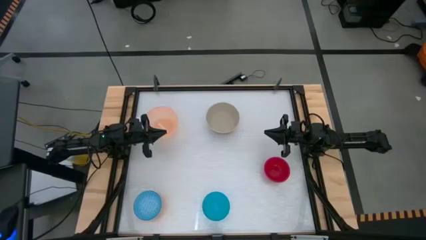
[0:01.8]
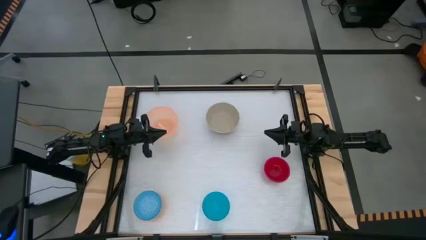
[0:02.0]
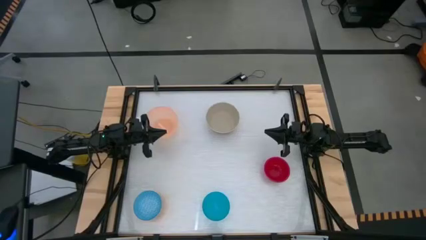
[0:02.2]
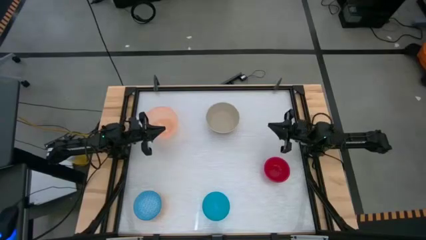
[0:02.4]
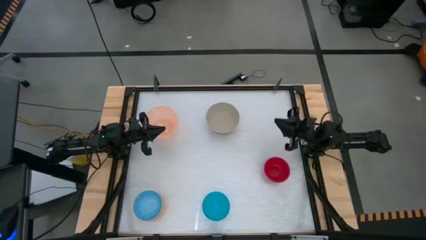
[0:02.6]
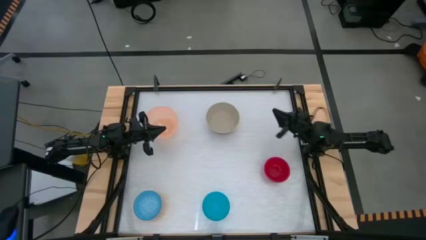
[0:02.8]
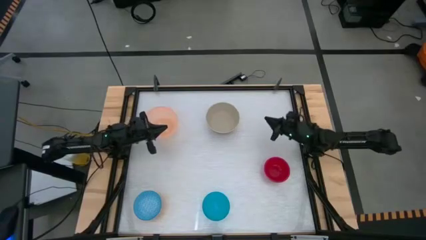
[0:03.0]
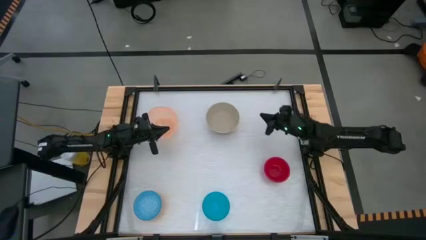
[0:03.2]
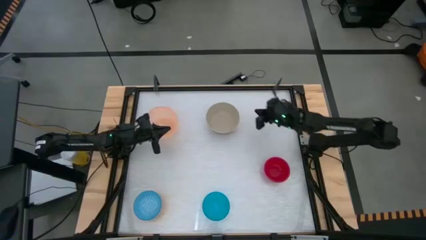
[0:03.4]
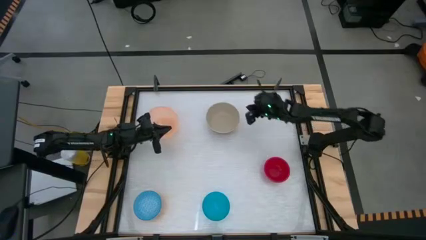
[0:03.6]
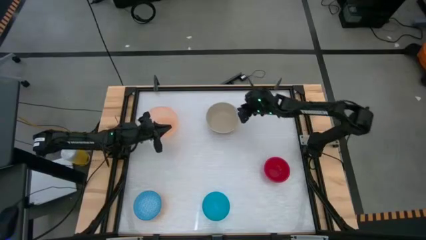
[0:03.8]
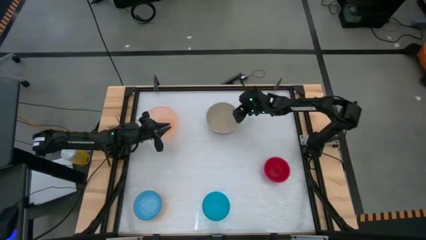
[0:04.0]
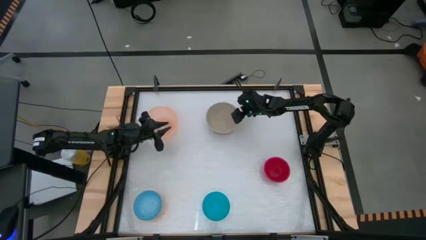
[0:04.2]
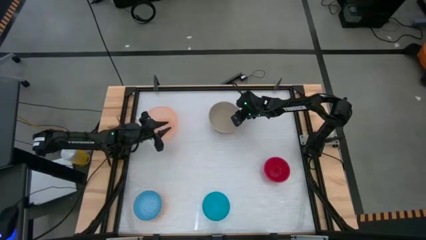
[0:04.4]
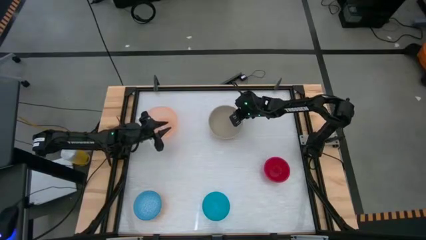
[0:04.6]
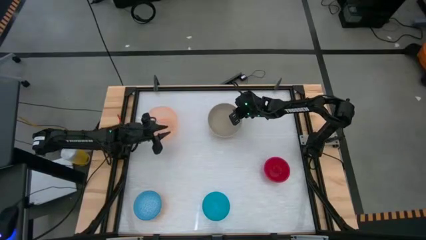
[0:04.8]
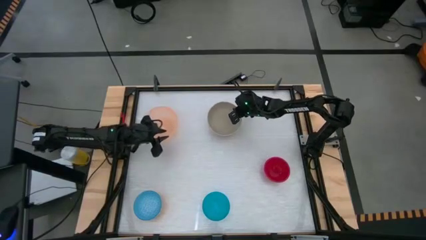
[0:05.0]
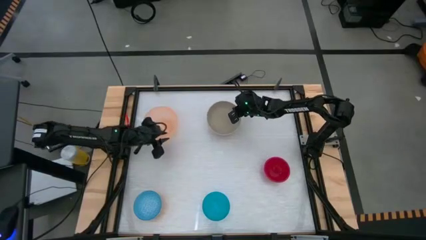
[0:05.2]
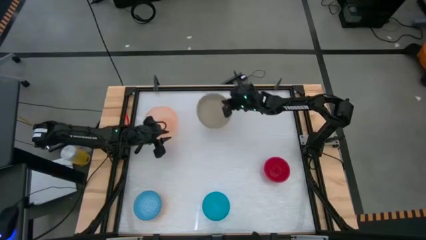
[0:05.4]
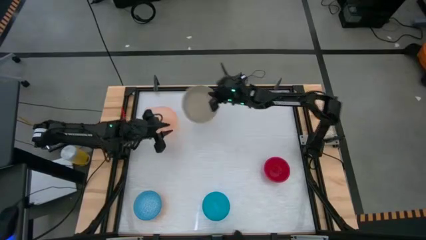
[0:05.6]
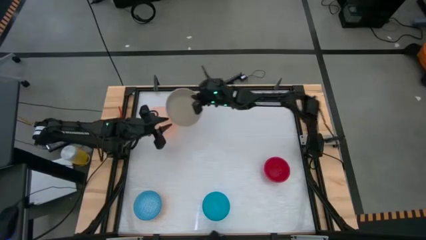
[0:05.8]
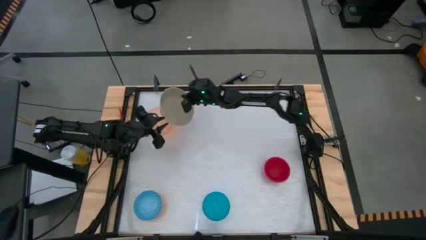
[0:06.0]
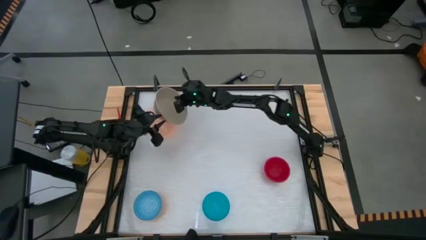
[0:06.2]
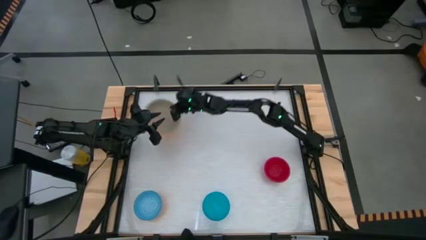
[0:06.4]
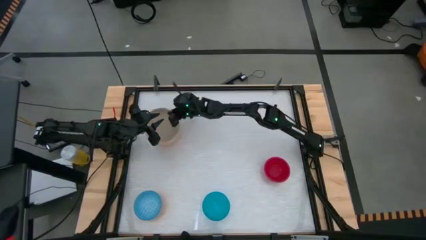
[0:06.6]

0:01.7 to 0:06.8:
Stack the gray bowl into the orange bowl

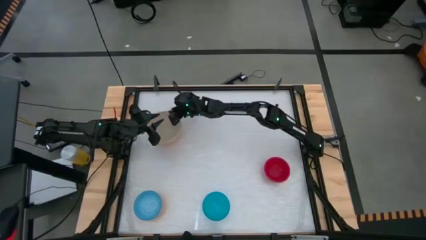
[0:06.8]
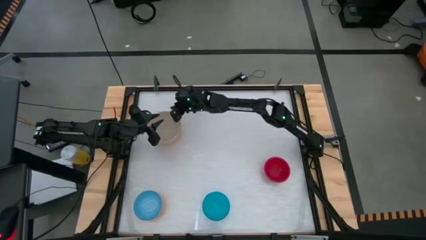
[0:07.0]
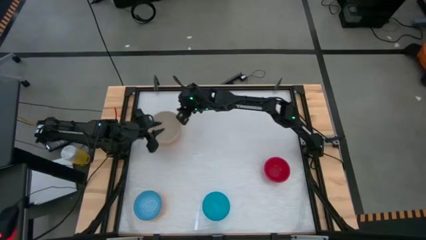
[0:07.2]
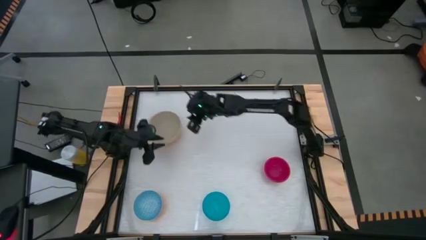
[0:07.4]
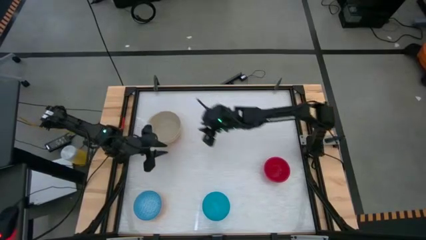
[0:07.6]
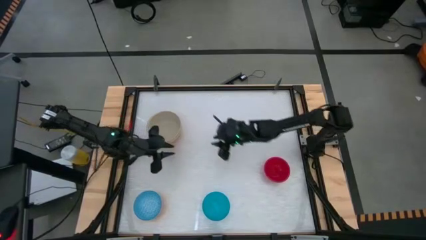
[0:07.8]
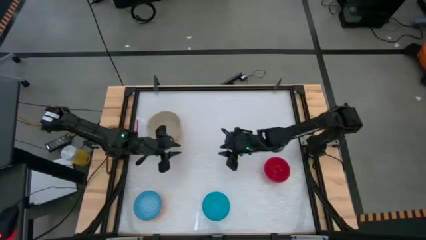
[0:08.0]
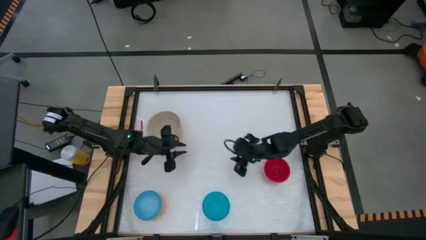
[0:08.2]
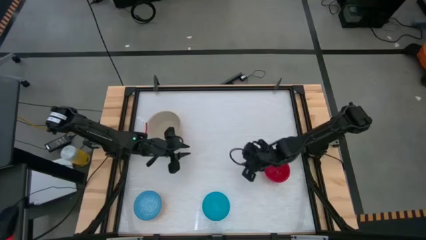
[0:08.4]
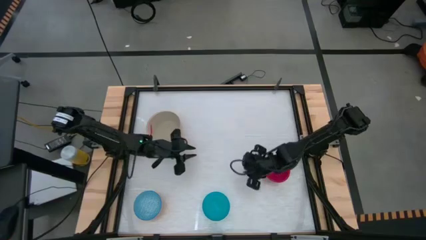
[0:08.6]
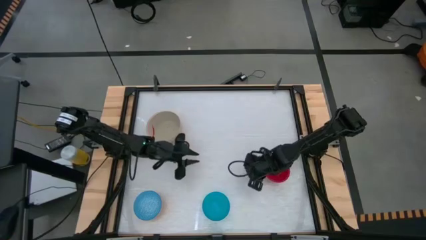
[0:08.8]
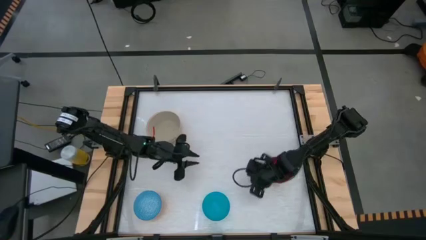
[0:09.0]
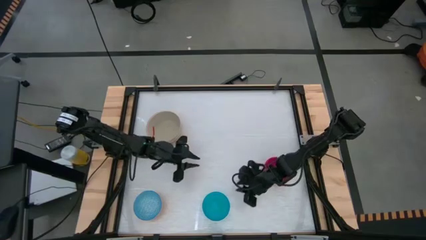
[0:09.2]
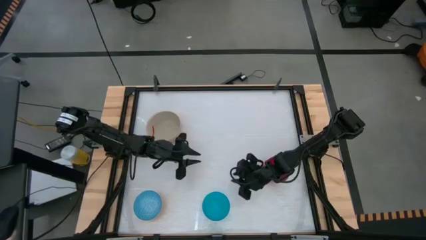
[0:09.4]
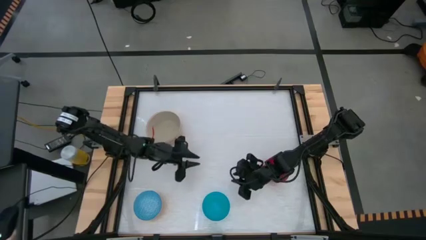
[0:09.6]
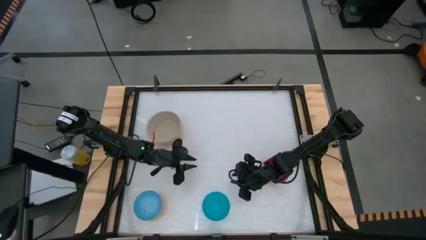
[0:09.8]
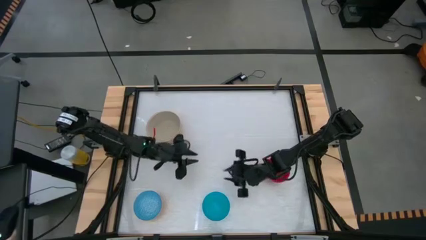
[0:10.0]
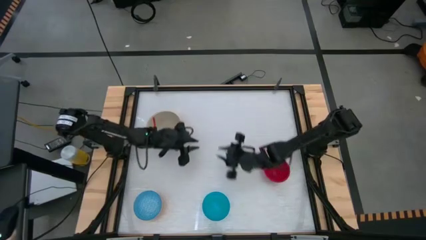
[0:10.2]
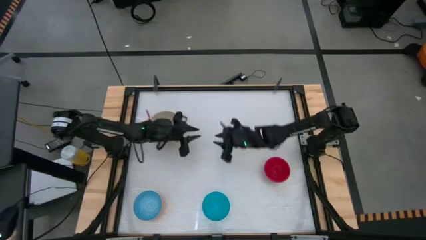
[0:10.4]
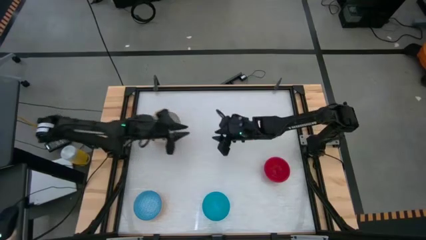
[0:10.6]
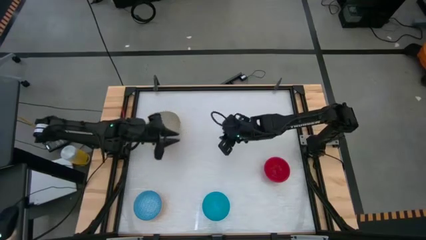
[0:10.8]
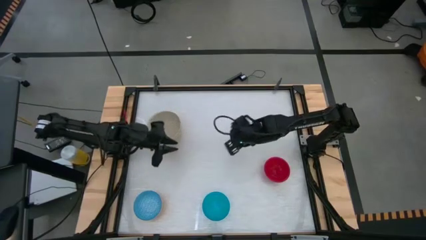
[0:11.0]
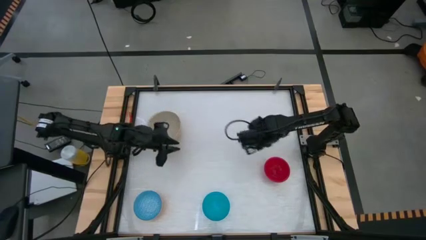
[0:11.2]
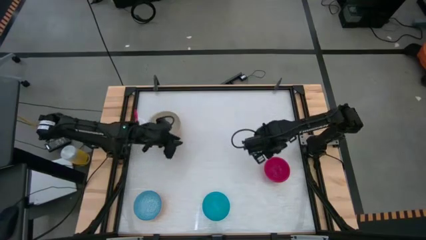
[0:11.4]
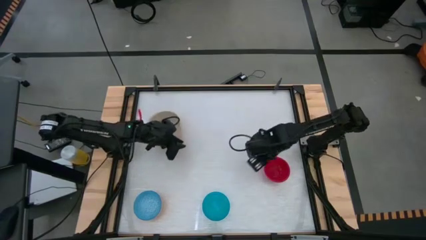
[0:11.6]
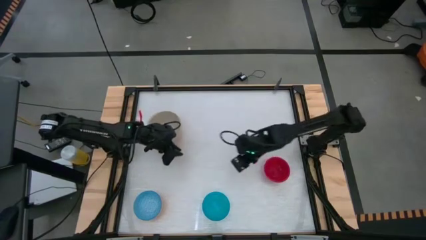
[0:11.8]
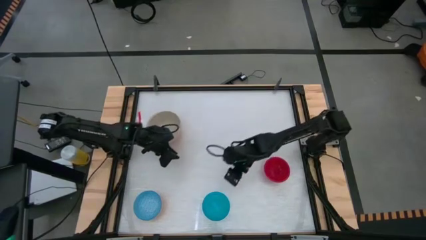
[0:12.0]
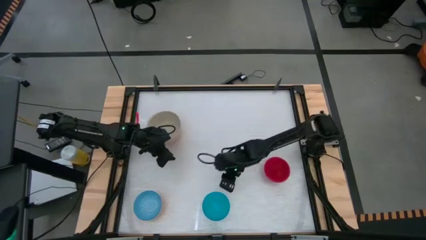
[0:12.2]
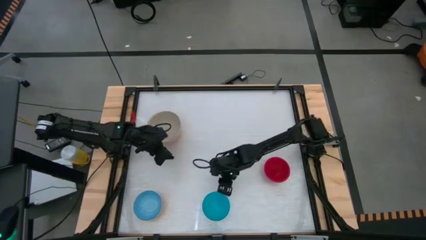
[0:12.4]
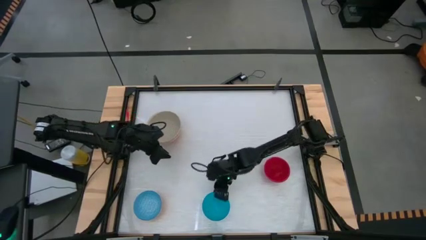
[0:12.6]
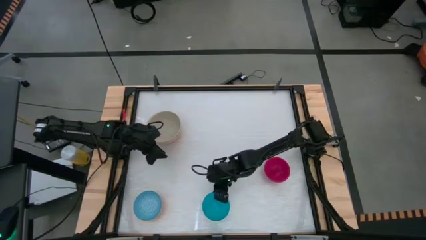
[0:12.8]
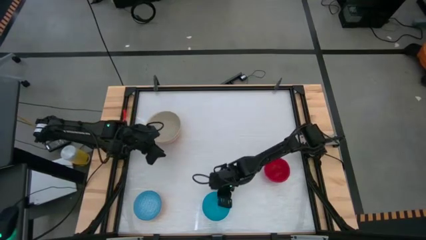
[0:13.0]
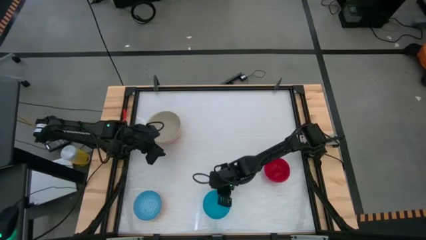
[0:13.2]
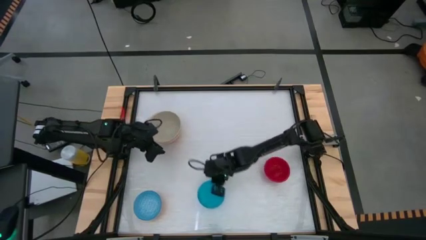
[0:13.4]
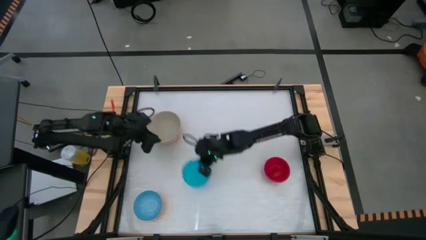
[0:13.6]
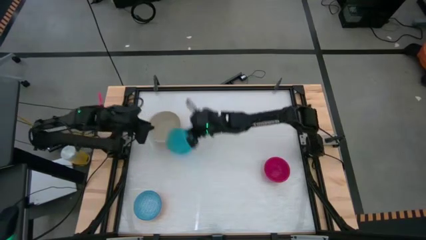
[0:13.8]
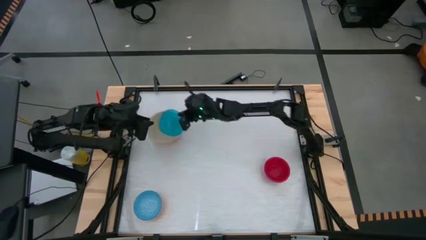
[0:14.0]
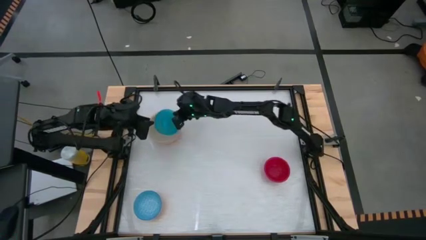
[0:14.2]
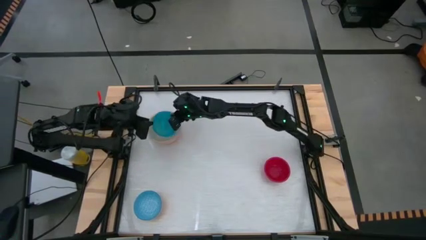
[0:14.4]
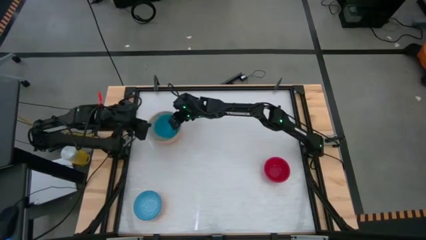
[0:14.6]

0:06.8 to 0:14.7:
Stack the blue bowl into the gray bowl

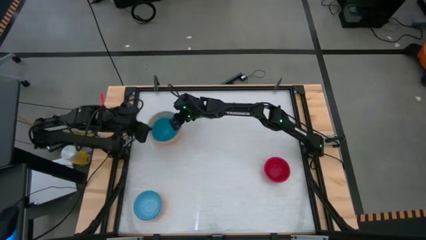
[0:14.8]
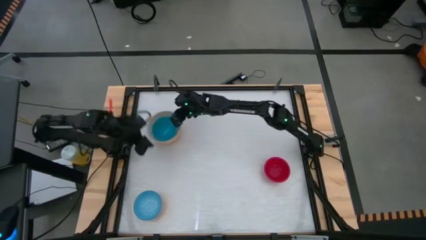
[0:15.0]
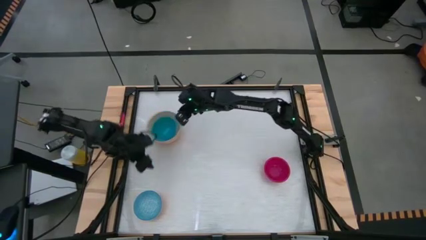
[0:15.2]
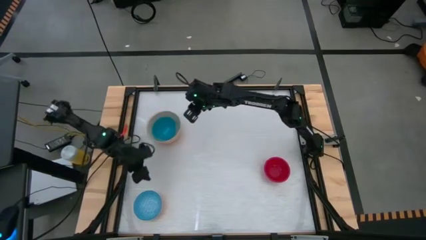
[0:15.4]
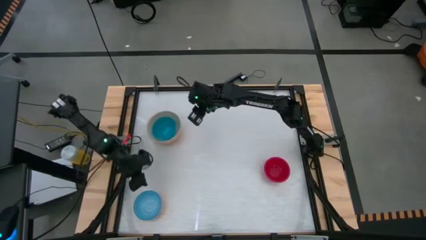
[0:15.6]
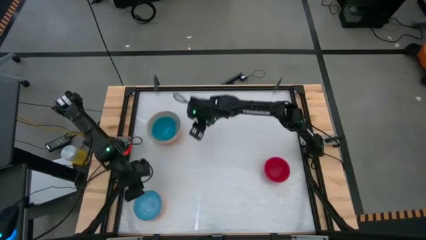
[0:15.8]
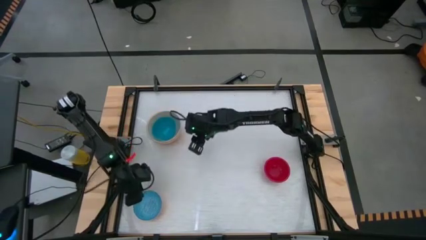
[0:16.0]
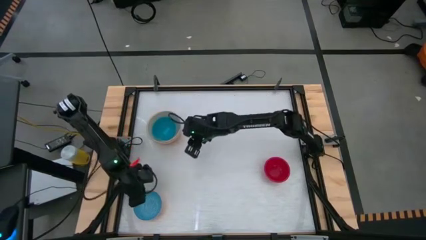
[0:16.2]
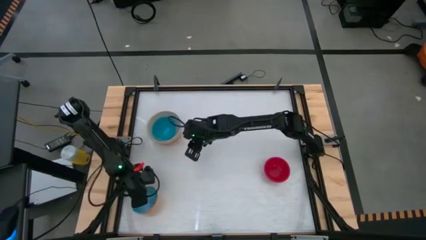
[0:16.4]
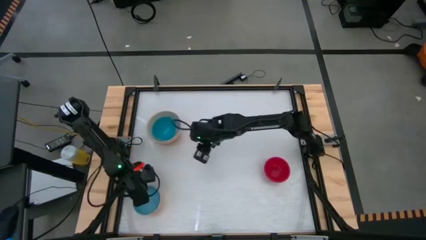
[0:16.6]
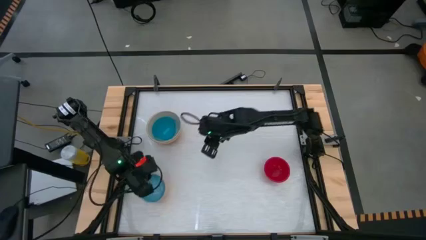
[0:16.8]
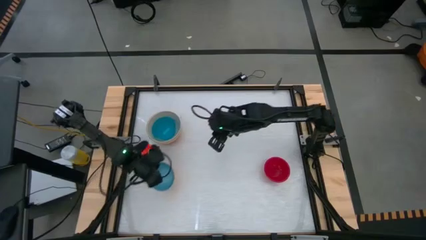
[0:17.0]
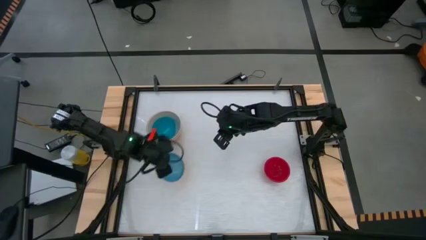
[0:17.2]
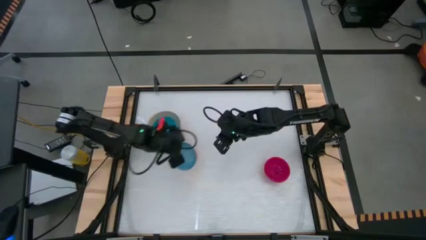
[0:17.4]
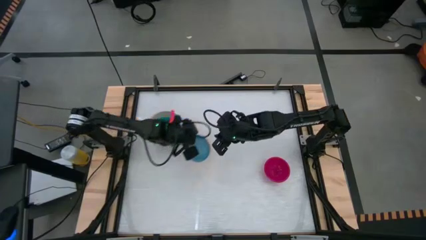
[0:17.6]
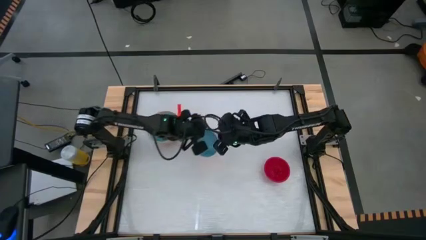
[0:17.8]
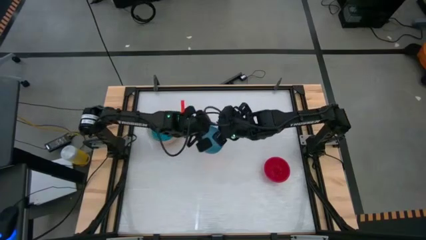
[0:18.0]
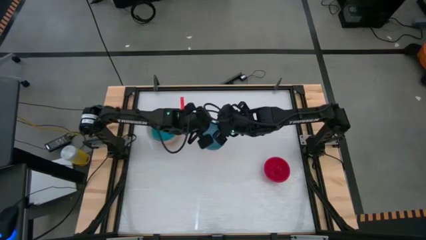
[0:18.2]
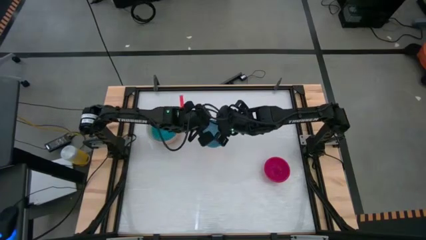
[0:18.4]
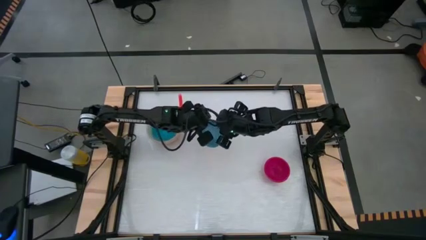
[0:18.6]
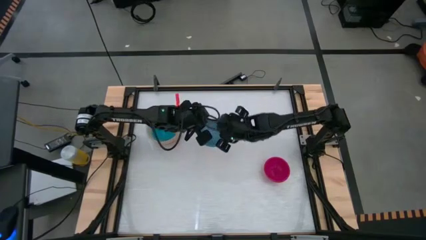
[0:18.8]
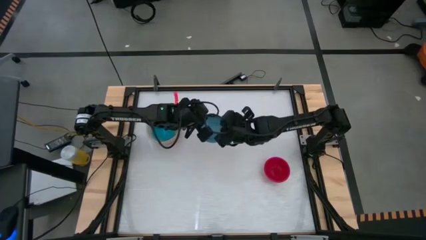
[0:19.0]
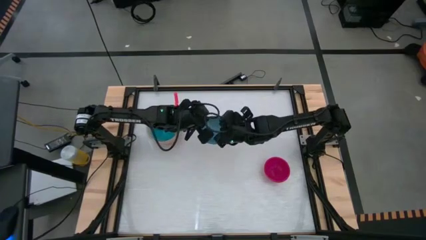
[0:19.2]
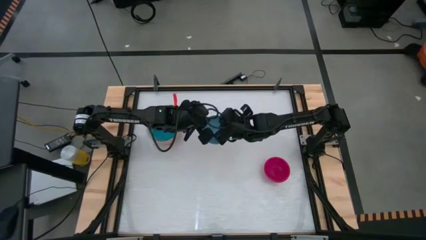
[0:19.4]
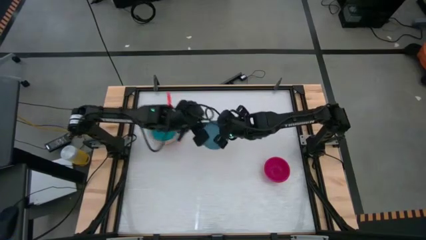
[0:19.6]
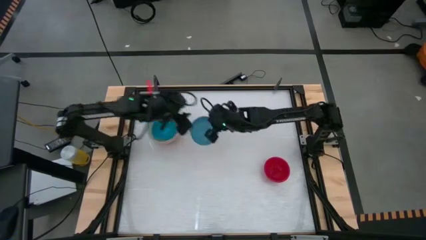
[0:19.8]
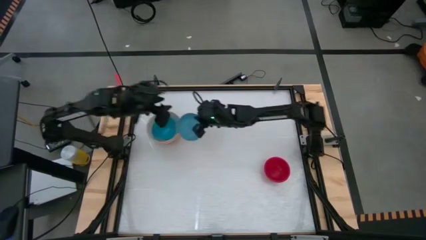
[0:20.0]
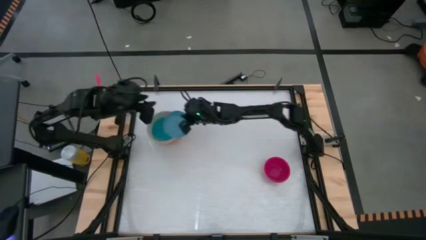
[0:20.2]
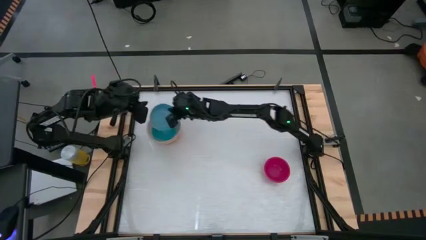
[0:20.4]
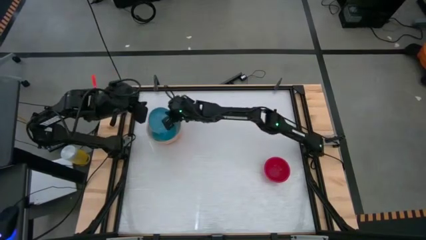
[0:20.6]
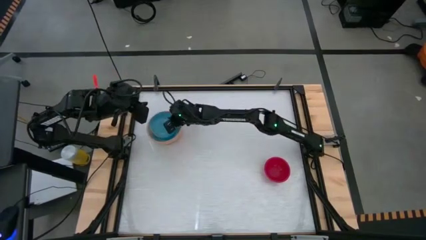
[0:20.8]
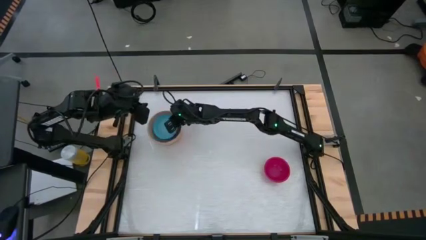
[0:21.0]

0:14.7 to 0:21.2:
Stack the blue patterned bowl into the blue bowl
